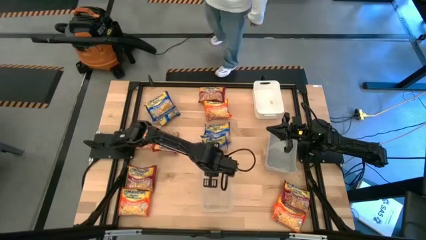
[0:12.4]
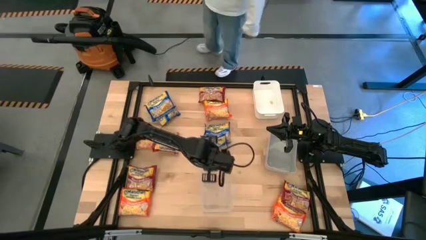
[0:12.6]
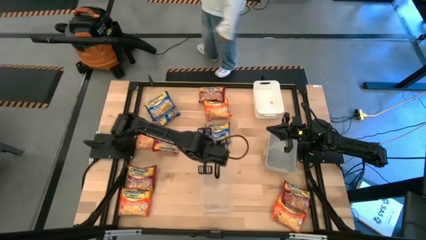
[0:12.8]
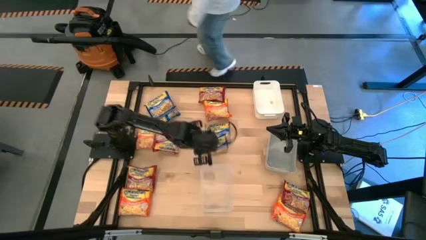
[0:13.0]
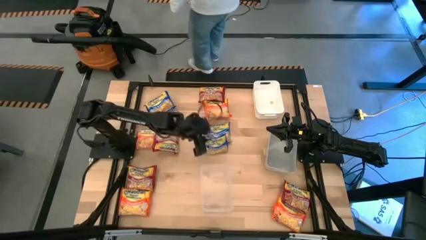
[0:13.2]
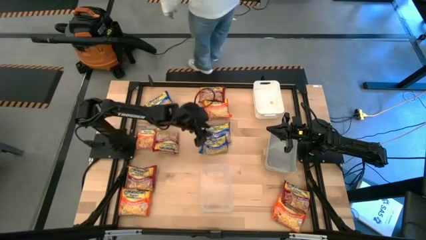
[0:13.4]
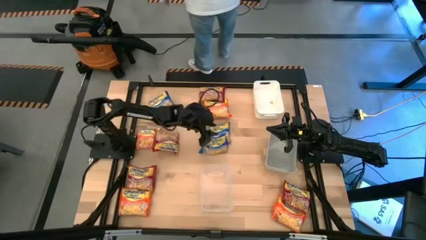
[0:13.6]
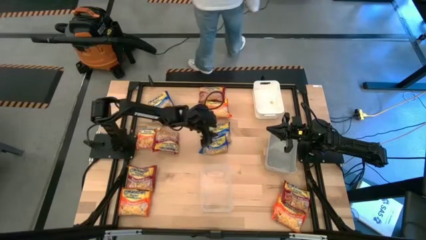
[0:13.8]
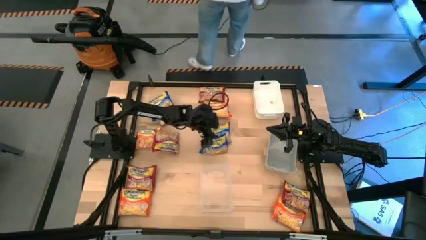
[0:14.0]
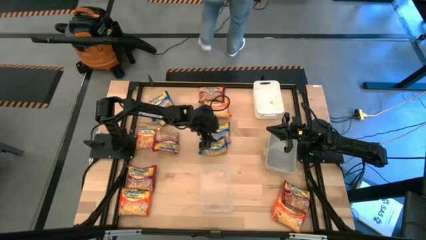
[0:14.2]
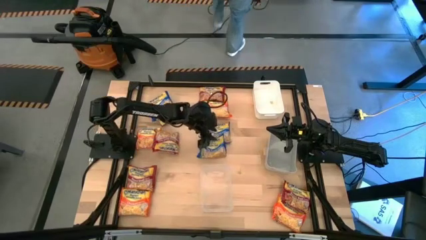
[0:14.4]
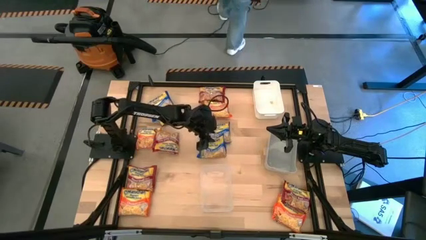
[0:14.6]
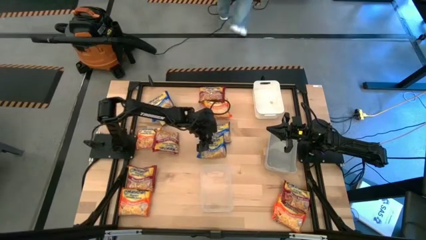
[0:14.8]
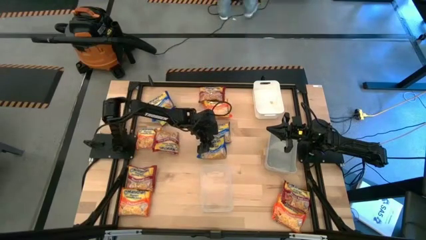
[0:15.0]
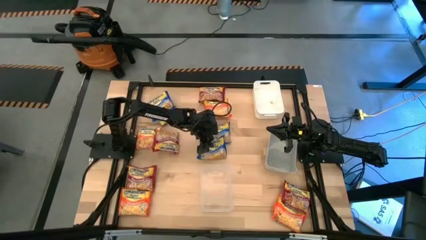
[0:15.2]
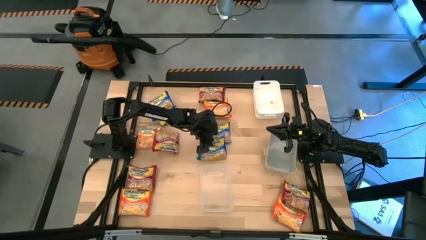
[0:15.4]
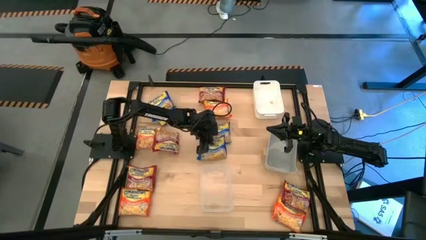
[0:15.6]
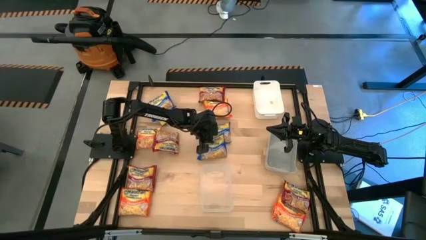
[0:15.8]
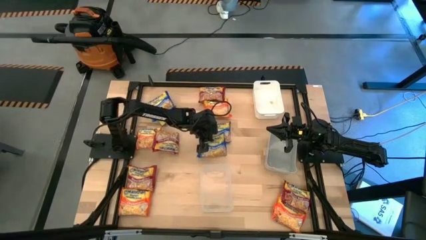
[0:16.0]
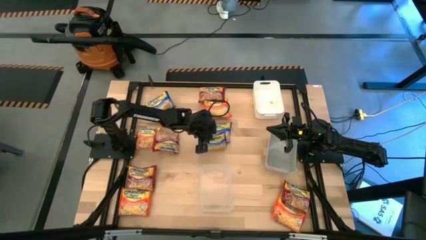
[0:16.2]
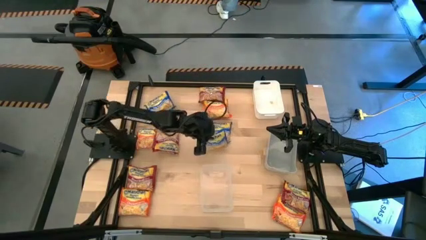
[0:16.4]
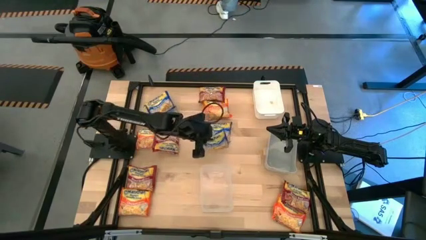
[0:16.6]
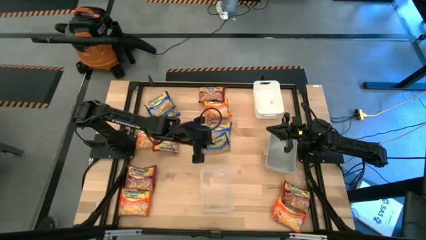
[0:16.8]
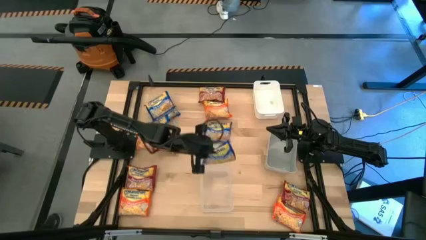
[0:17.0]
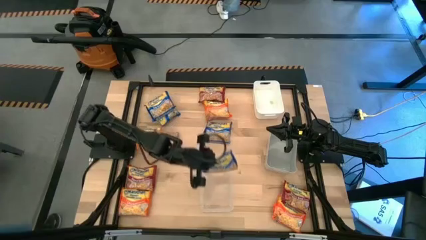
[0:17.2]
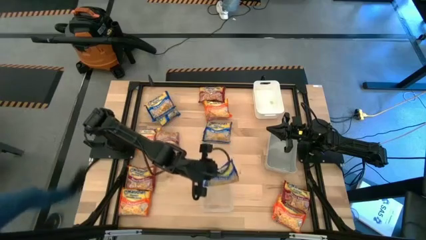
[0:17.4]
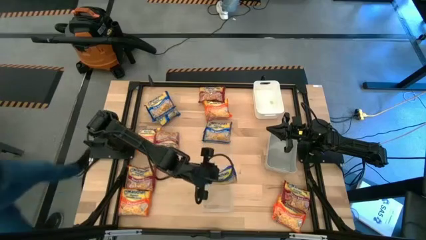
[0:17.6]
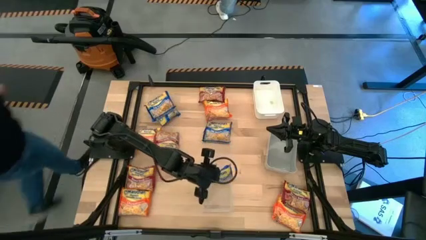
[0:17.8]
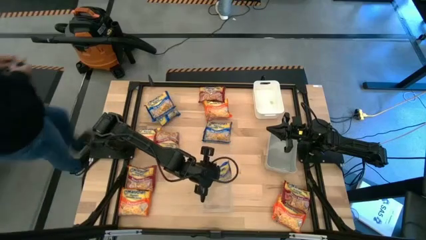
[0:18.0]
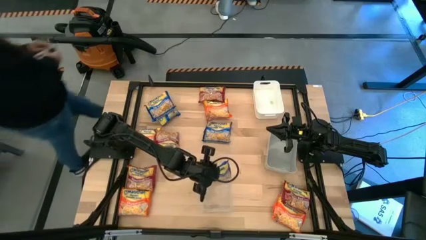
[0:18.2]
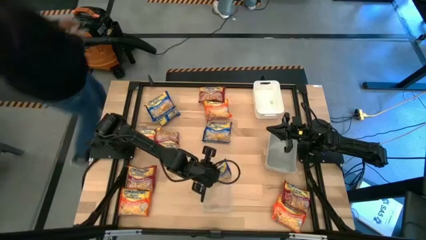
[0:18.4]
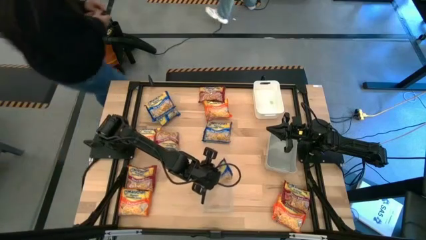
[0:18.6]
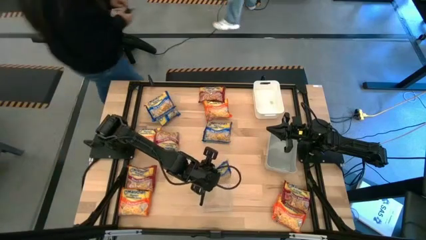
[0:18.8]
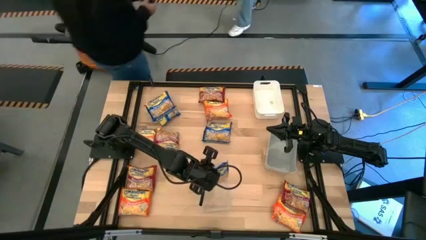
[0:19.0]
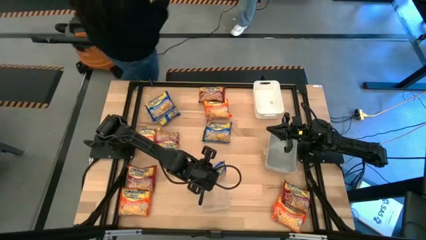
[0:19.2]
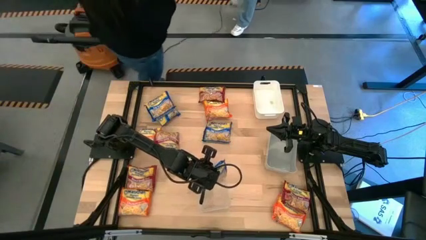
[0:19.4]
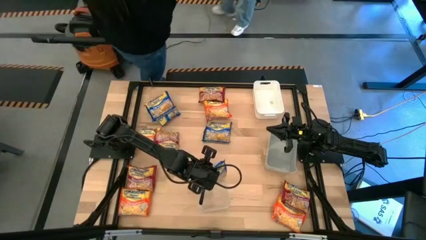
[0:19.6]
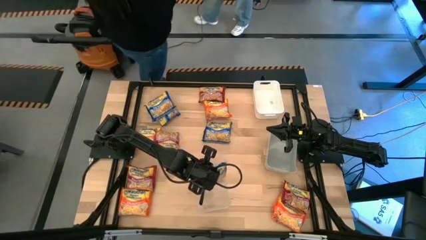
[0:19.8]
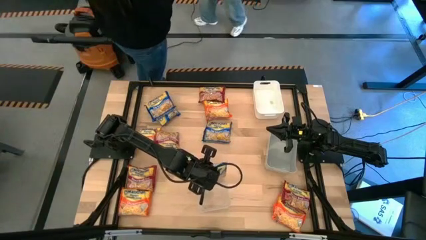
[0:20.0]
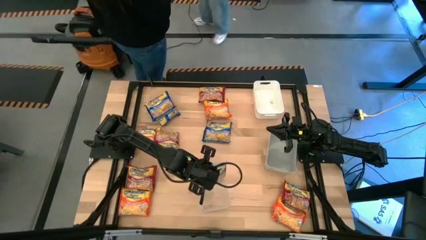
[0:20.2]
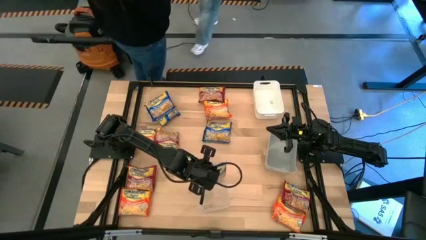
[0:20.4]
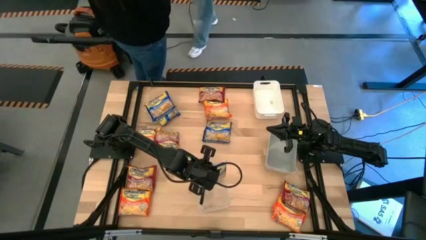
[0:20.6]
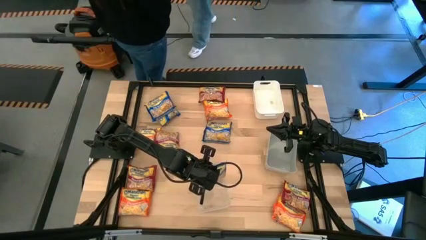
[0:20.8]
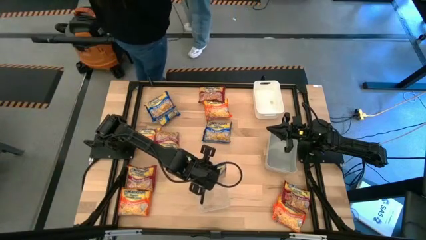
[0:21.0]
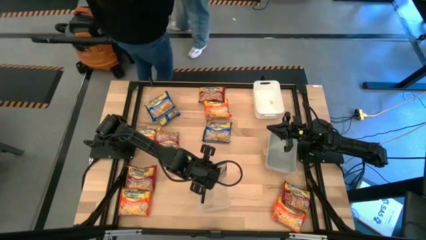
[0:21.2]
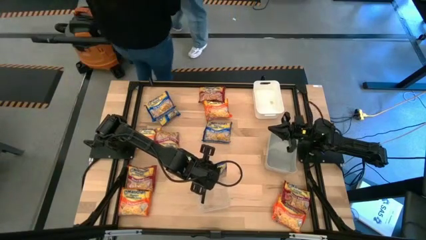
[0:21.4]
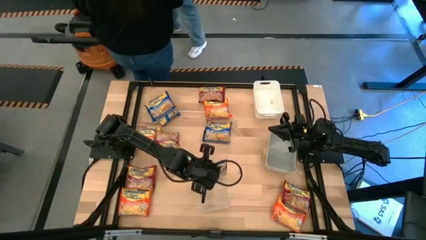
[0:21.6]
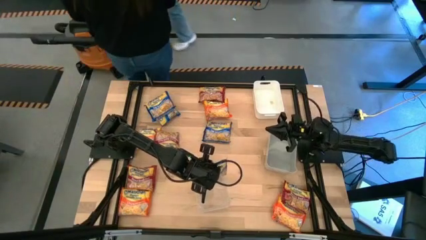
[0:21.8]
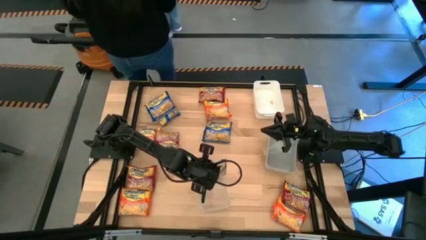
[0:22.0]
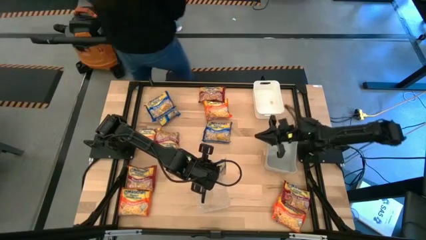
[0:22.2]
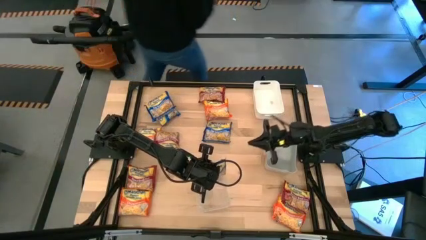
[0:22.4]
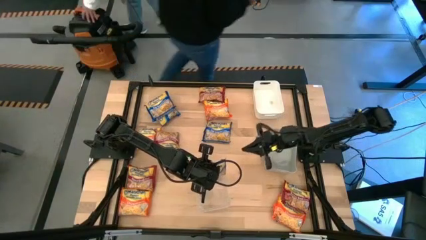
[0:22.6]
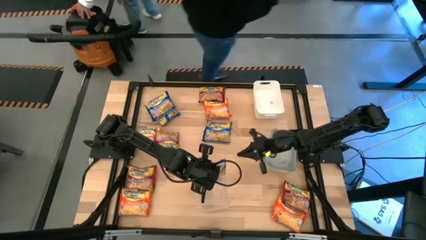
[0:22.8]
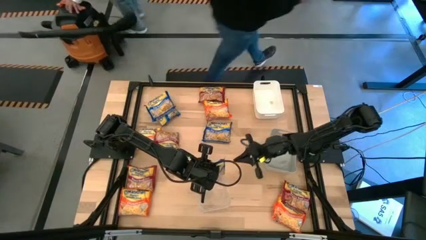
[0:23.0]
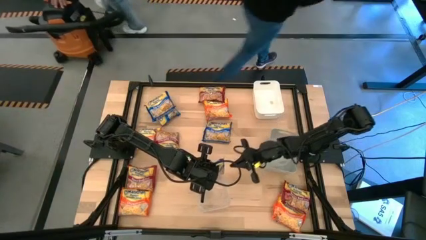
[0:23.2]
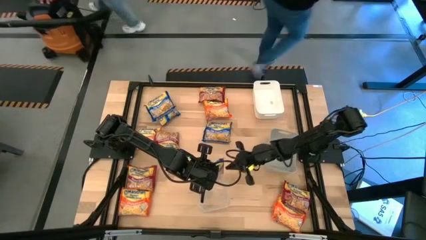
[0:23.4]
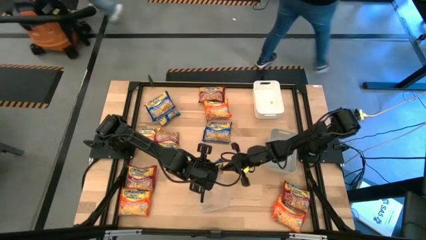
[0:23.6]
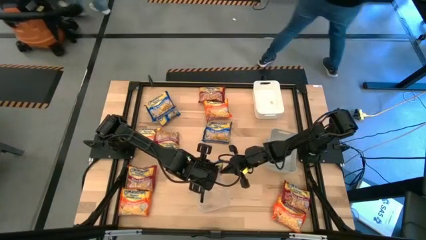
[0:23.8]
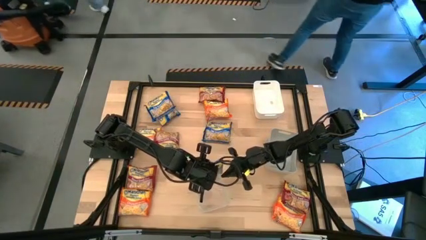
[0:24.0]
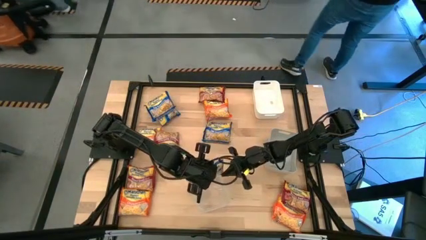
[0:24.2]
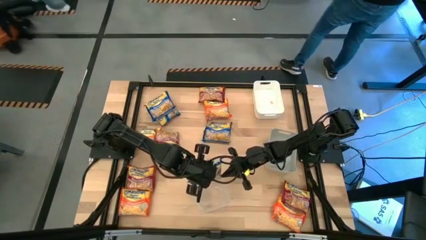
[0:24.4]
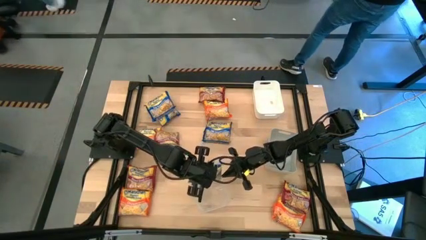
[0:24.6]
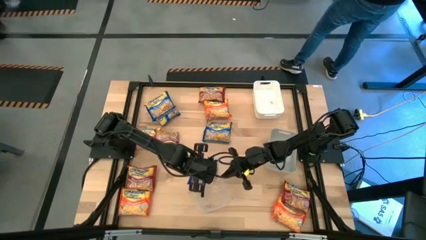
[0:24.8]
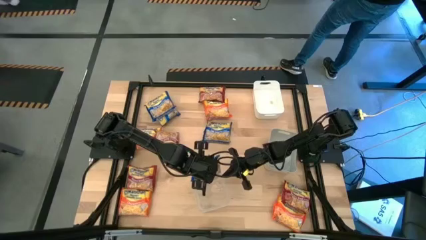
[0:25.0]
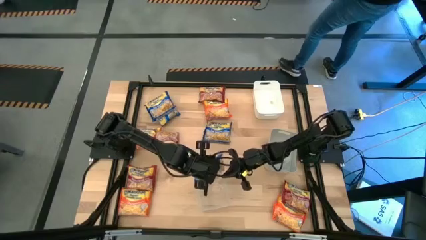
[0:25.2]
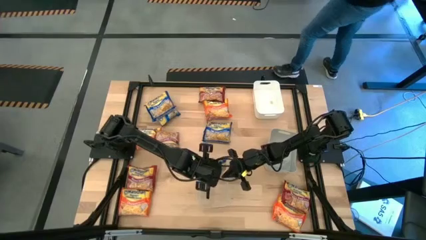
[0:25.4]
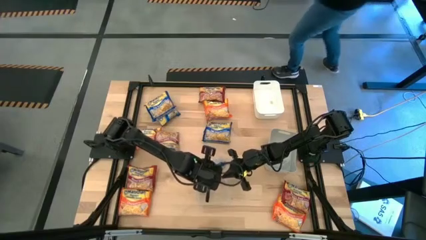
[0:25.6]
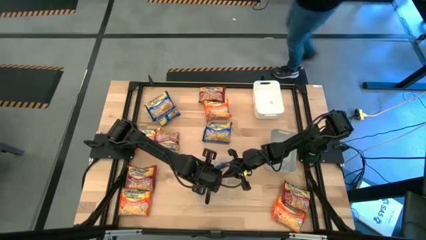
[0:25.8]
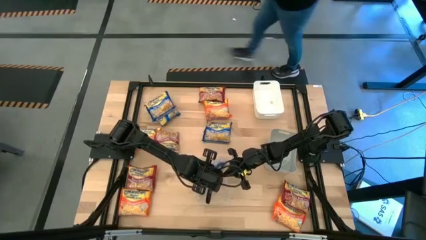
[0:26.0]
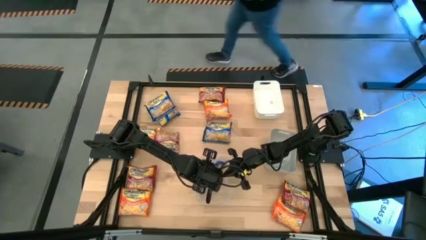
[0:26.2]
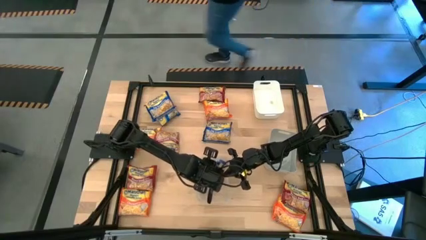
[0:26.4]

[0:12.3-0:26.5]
Task: Sort Maruchan noodles
Put the blue noodle pack into the transparent bin

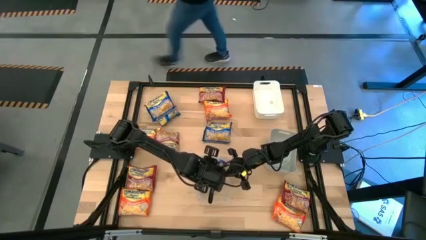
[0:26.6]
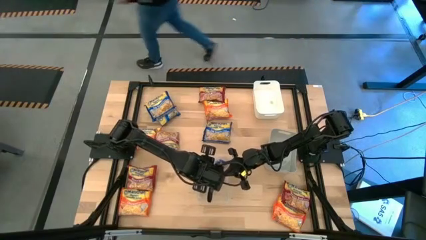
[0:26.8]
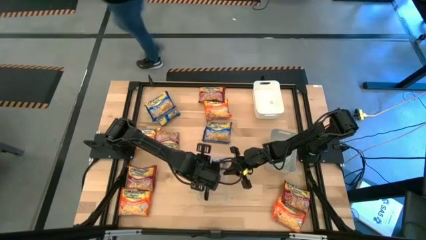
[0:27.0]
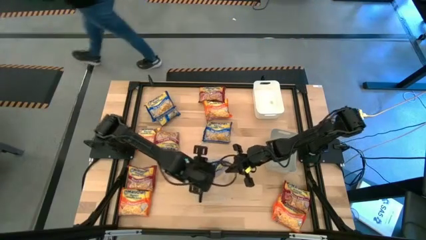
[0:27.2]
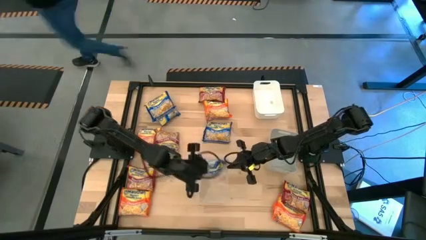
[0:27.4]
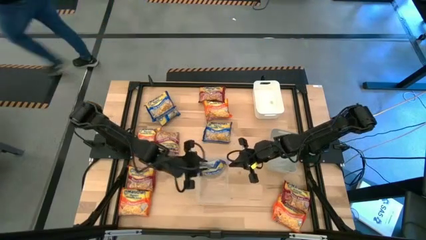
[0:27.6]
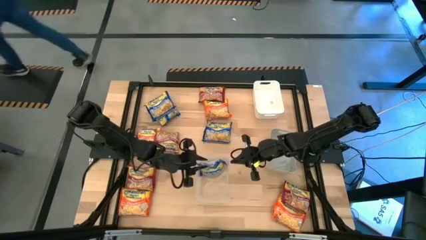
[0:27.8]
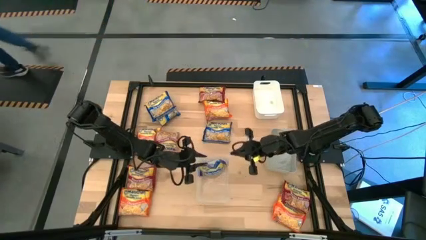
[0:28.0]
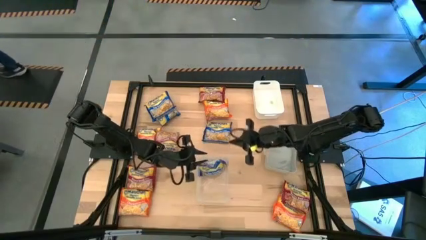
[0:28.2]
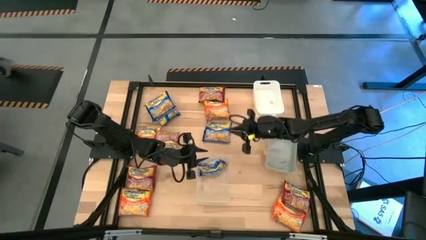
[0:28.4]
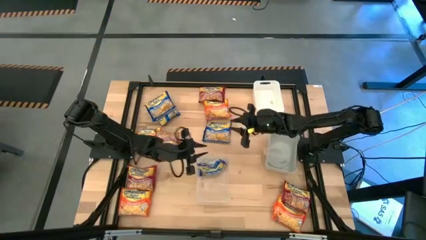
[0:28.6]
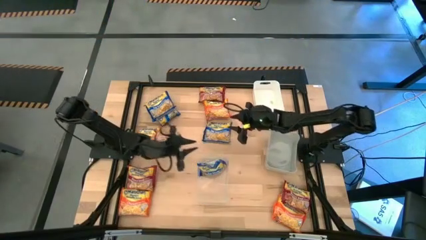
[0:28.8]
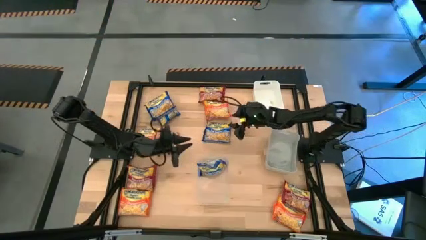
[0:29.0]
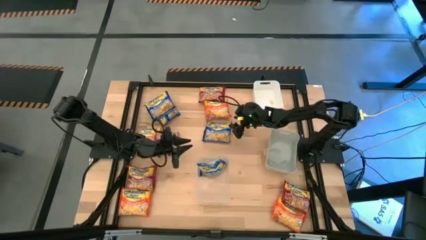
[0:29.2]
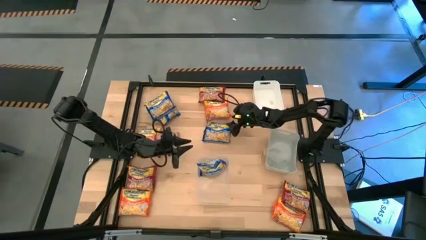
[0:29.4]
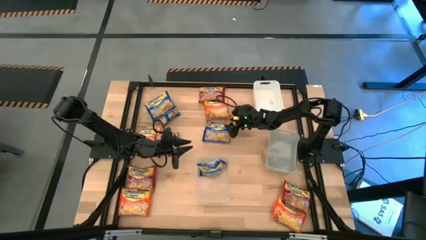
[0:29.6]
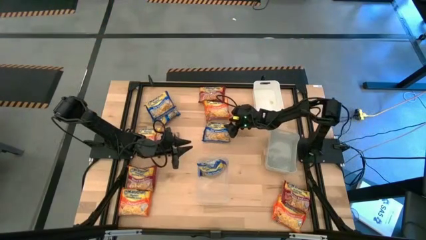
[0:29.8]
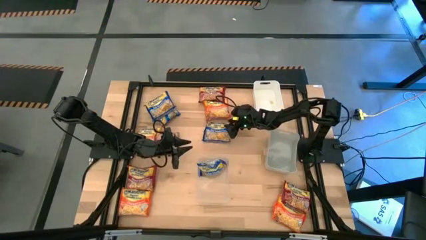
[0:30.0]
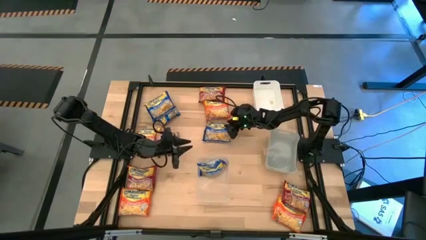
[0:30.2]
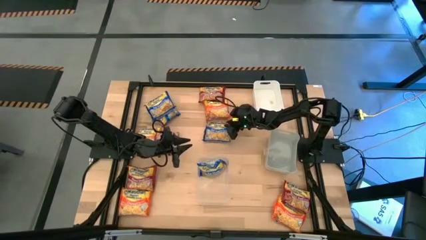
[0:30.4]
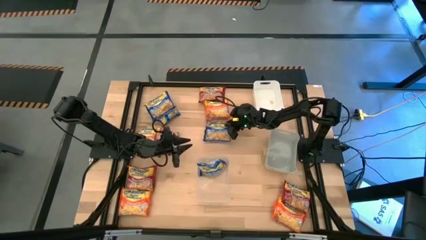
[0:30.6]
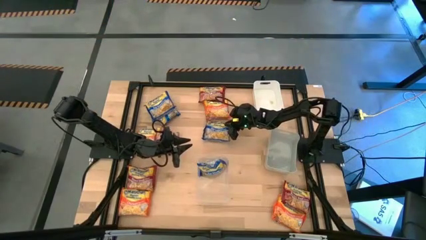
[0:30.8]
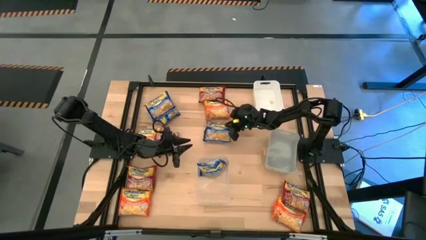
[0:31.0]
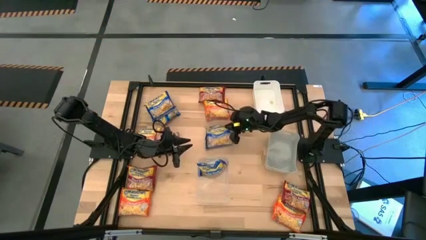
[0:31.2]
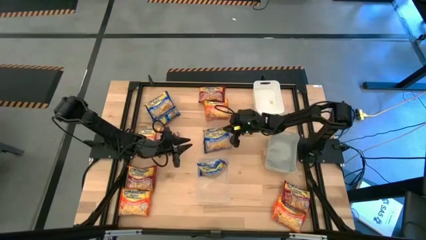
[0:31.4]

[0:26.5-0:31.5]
Put the bottom blue noodle pack into the transparent bin
